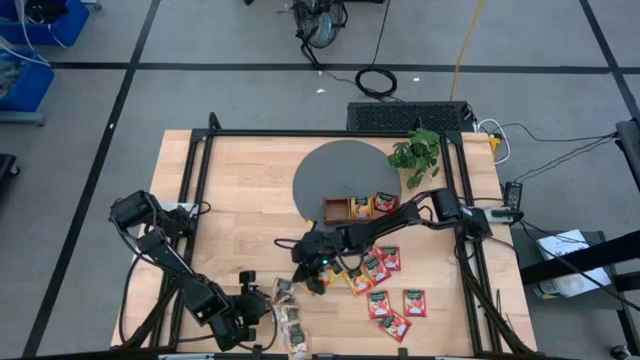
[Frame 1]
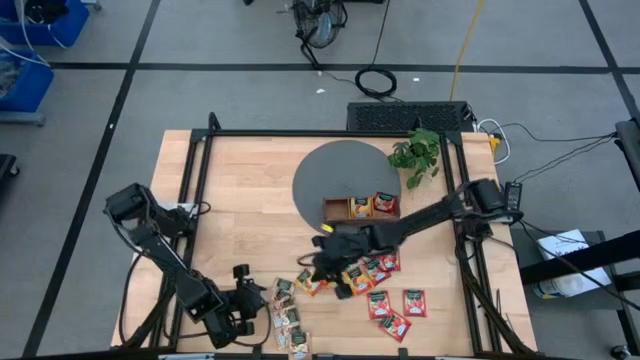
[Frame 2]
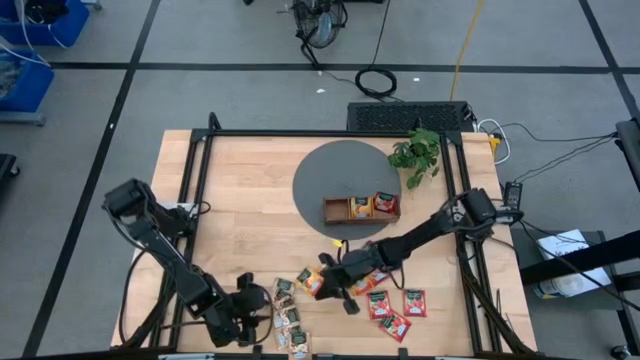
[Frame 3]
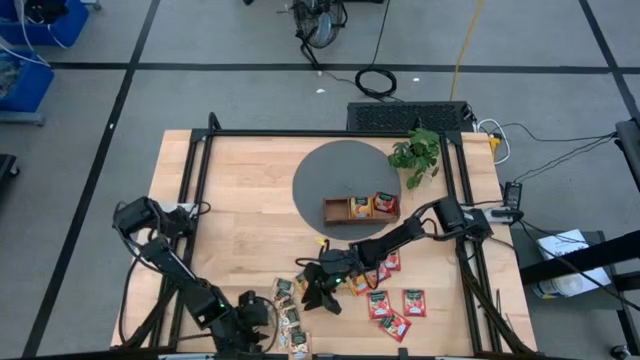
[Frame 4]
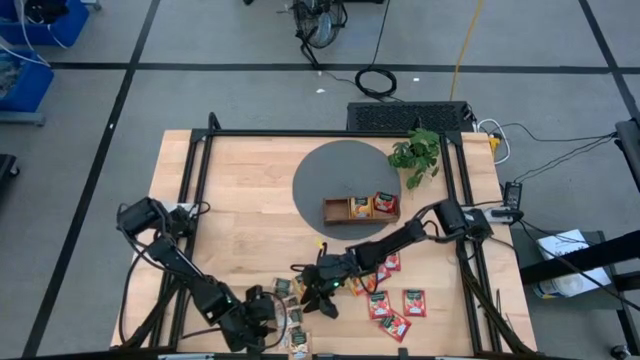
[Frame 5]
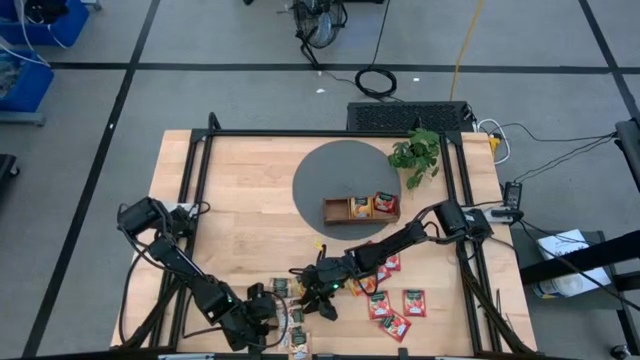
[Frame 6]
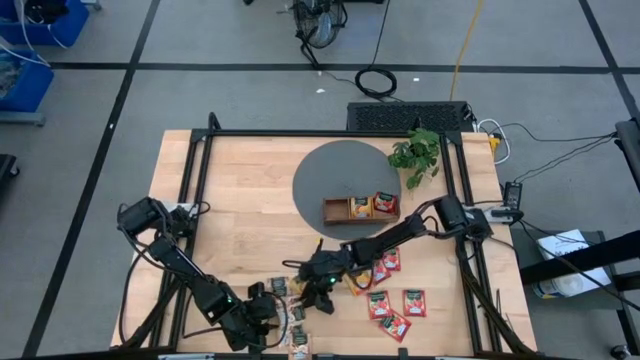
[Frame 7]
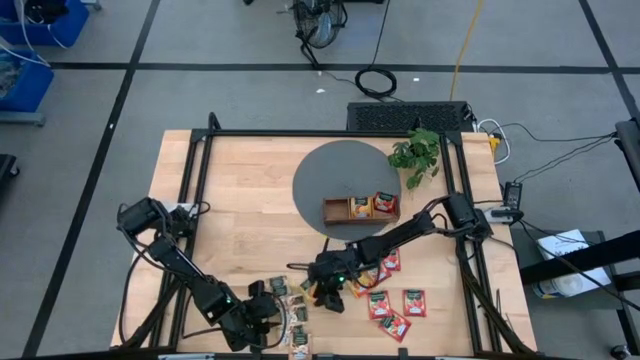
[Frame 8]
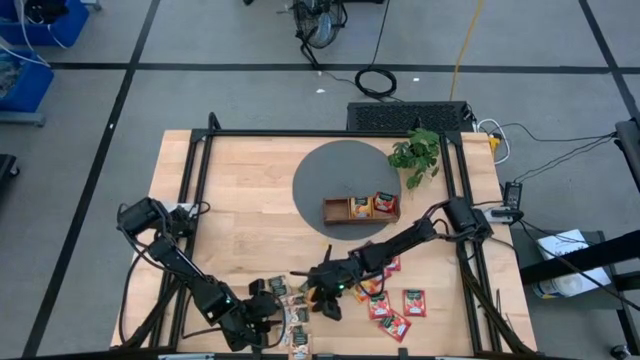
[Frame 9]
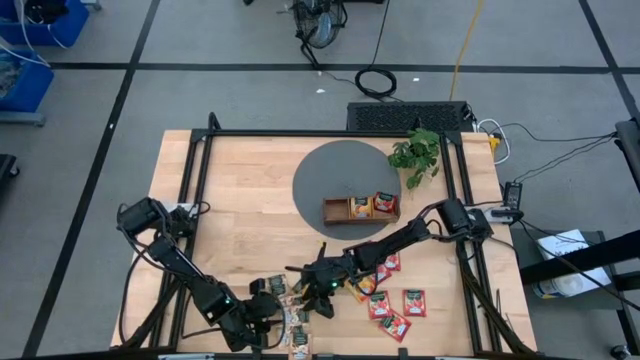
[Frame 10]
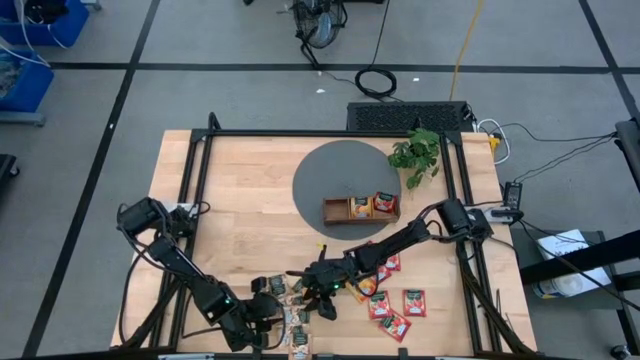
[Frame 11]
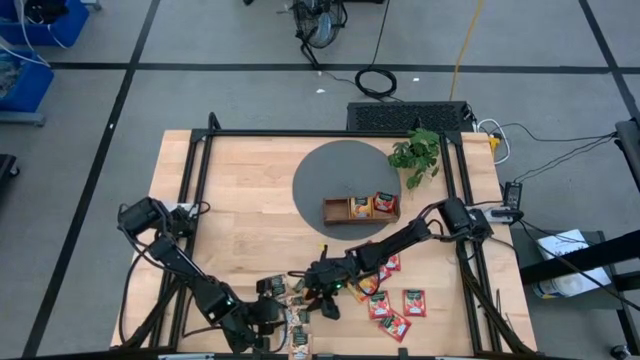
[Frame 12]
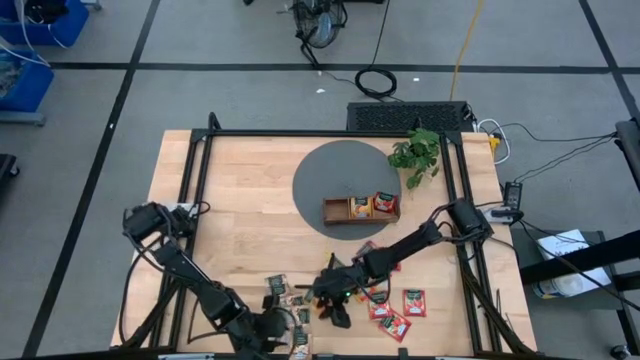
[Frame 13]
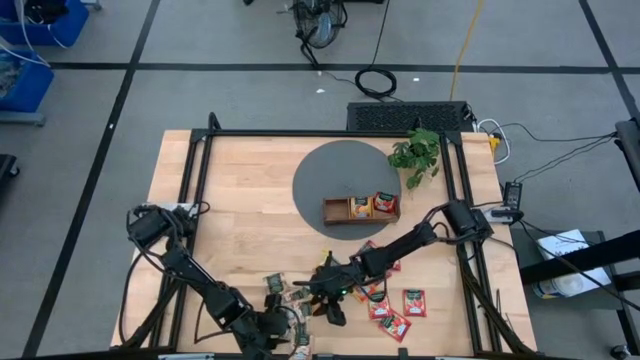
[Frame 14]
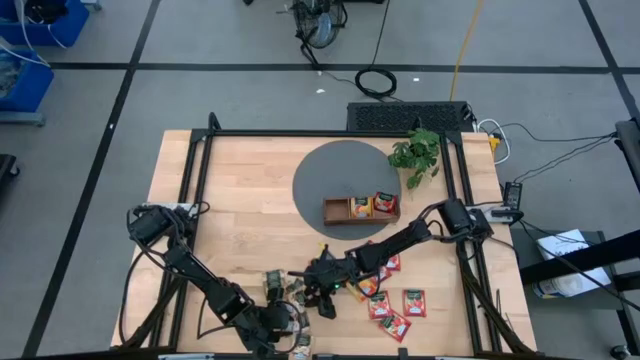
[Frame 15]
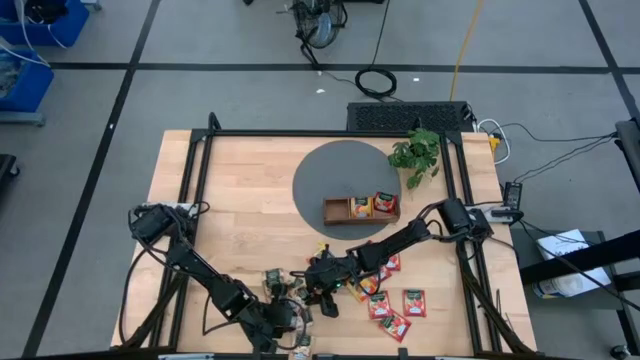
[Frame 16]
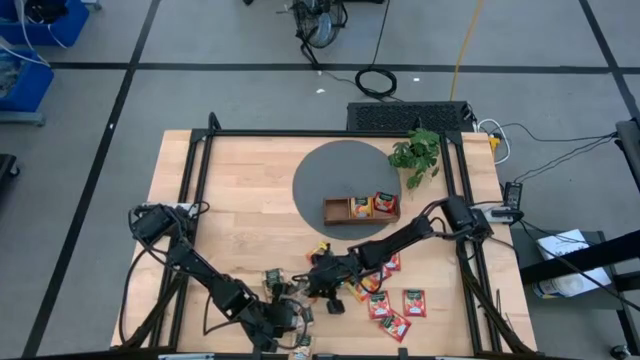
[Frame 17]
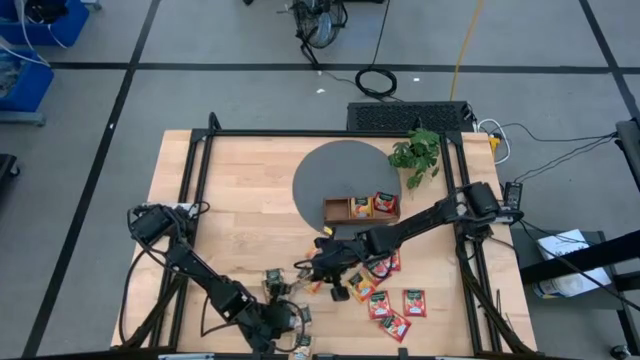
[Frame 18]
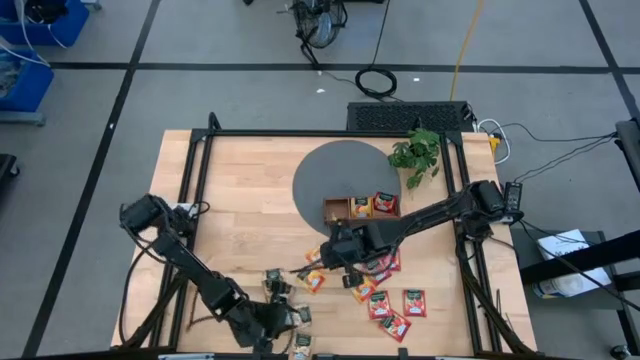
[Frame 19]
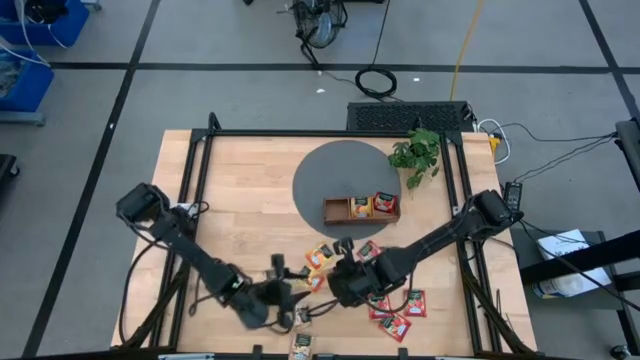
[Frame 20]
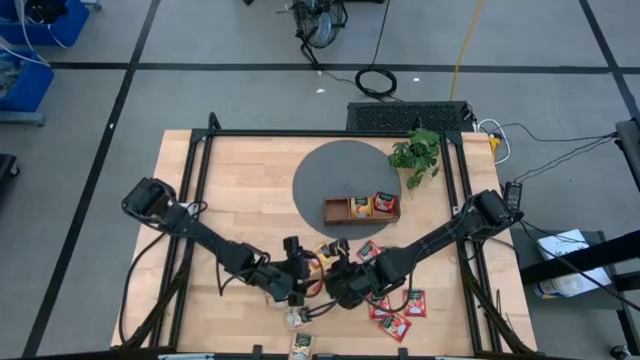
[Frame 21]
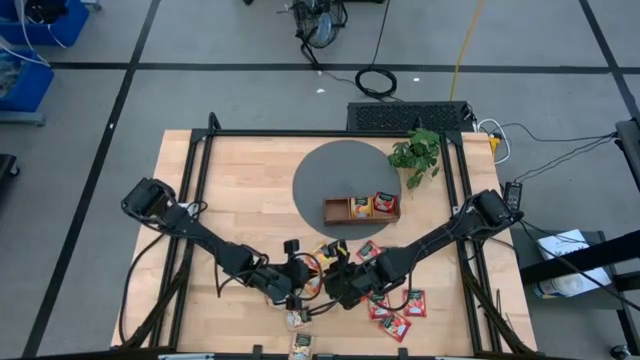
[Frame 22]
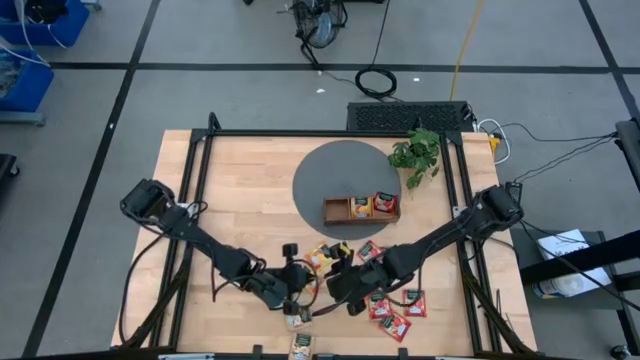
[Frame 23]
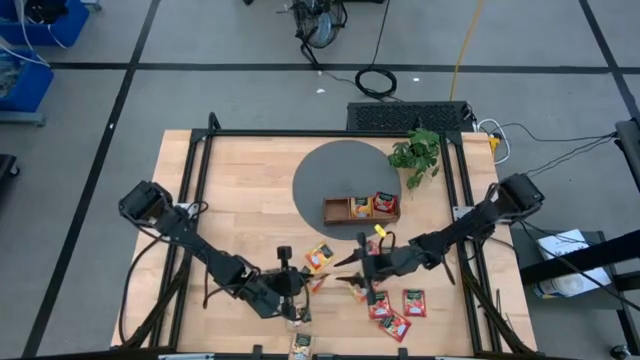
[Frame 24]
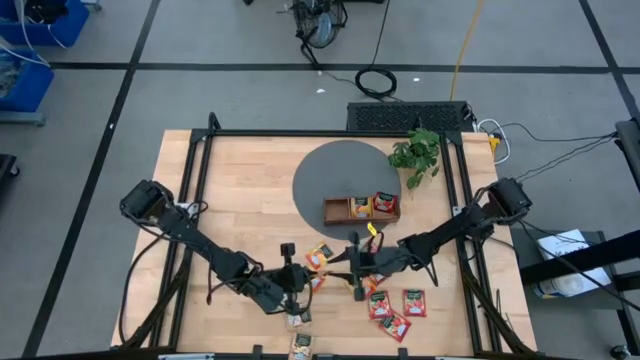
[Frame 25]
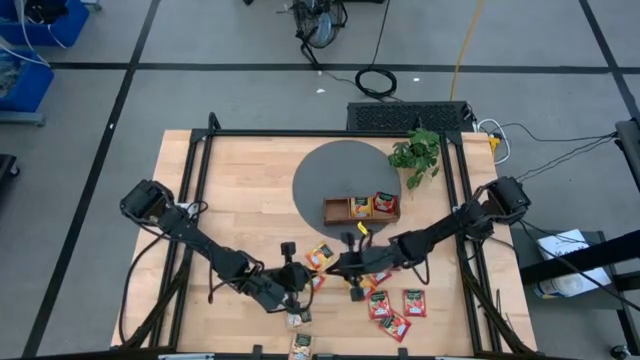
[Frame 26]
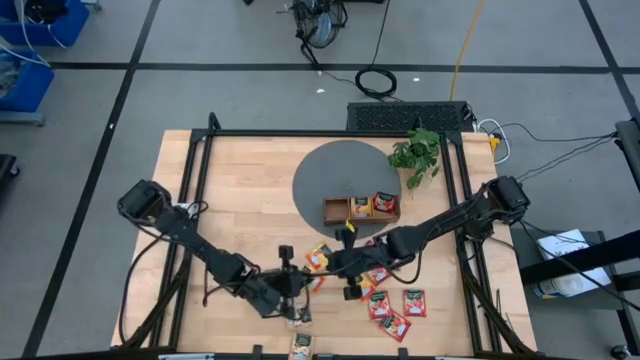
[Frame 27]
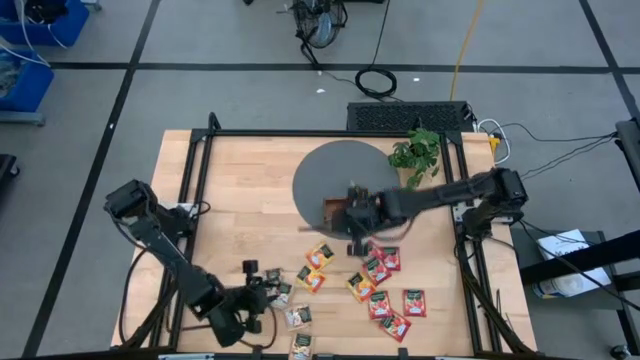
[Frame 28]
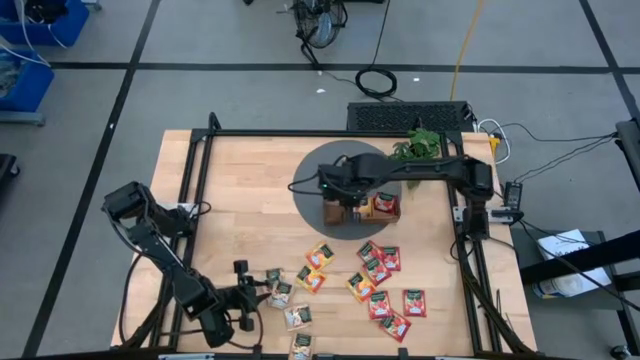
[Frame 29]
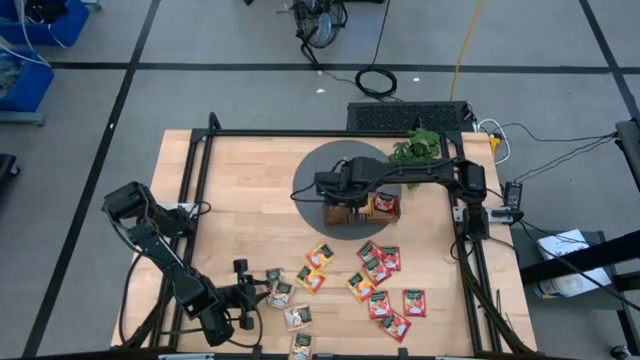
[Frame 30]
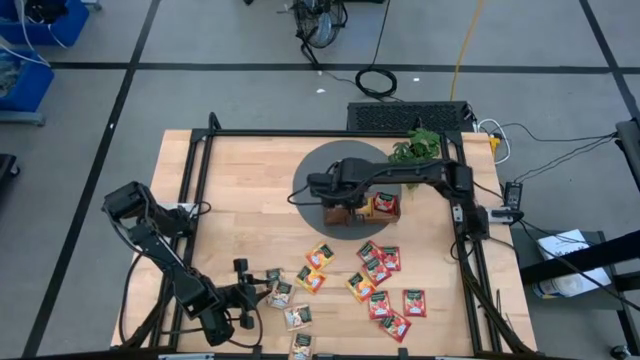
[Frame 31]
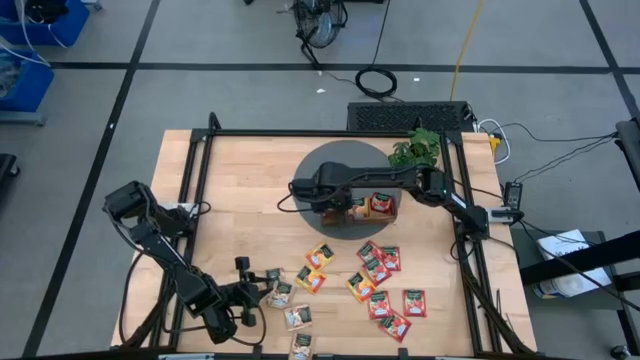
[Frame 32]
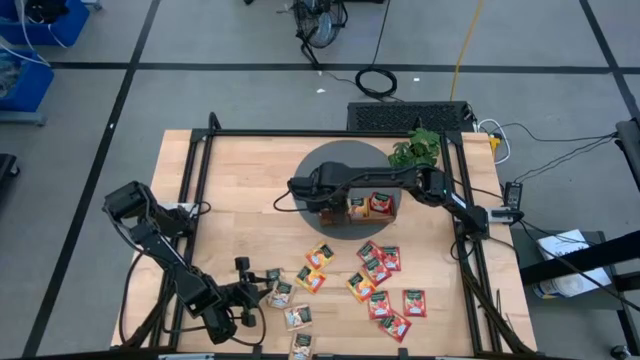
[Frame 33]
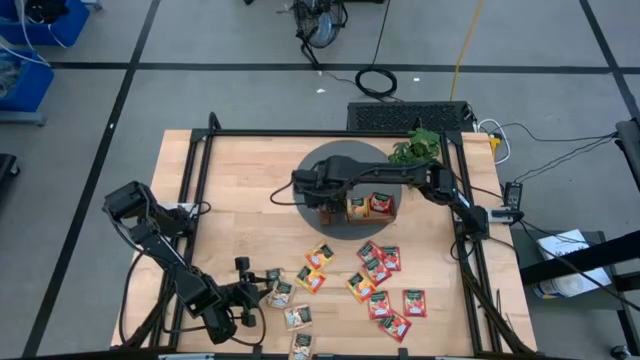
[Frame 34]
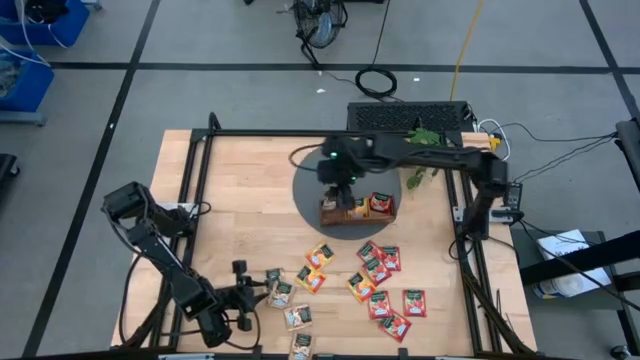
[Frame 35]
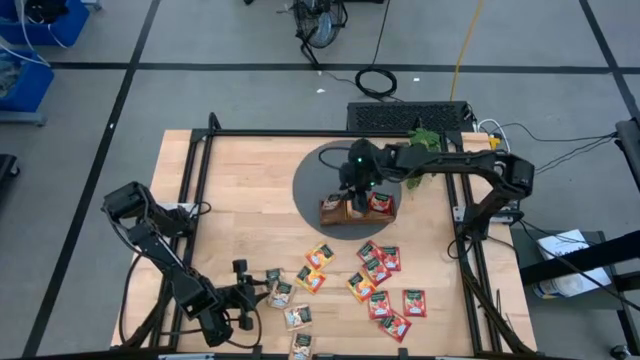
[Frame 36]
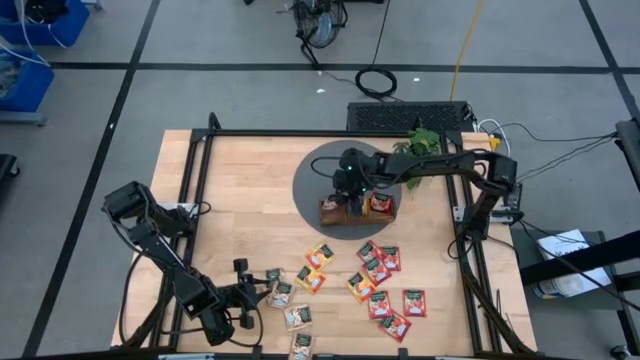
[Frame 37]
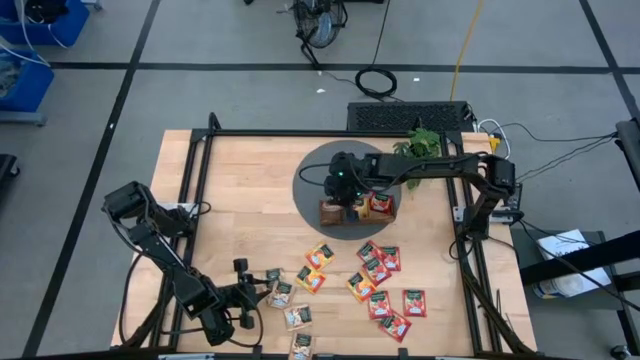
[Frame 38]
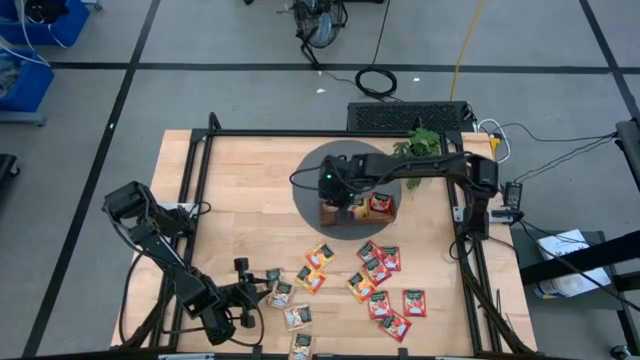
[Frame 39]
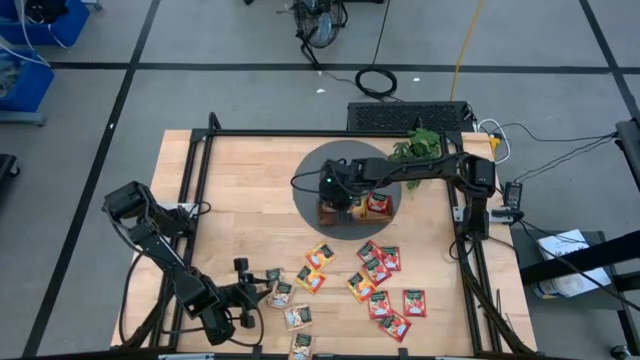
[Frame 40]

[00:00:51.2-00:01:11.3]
Task: Pick & Place Tea
Put the brown tea bag into the left section of the wooden organizer

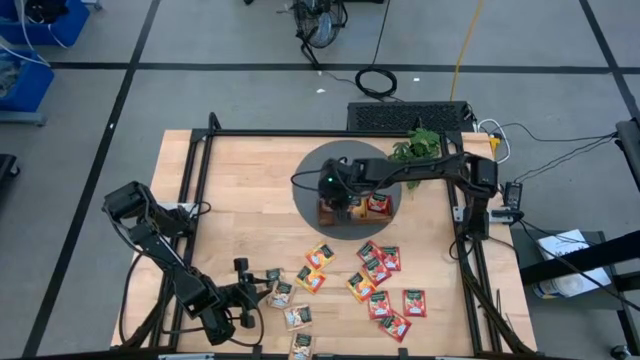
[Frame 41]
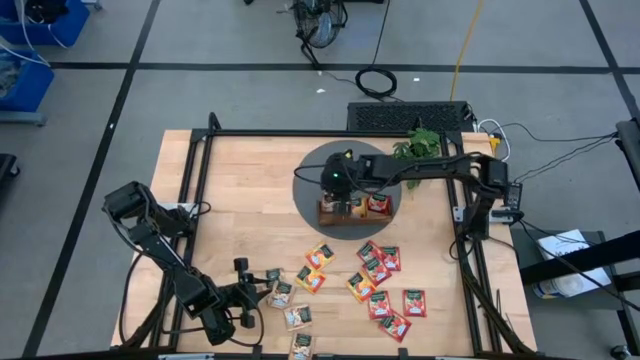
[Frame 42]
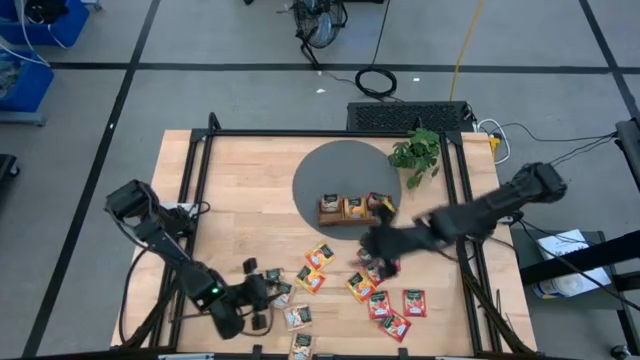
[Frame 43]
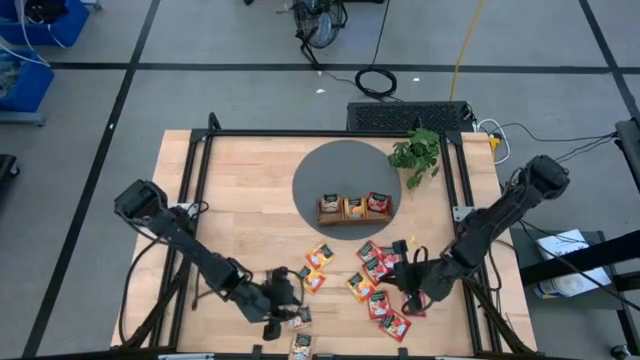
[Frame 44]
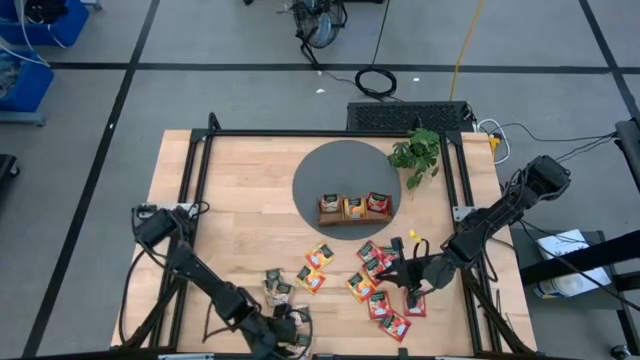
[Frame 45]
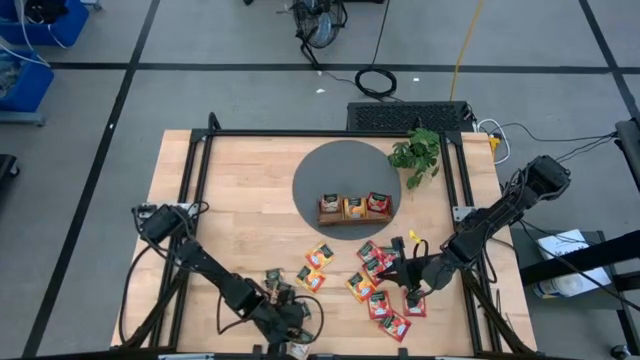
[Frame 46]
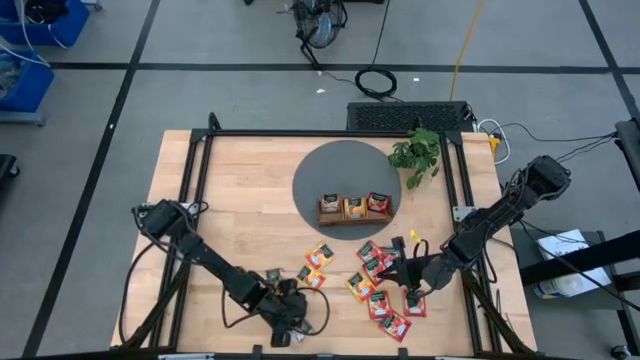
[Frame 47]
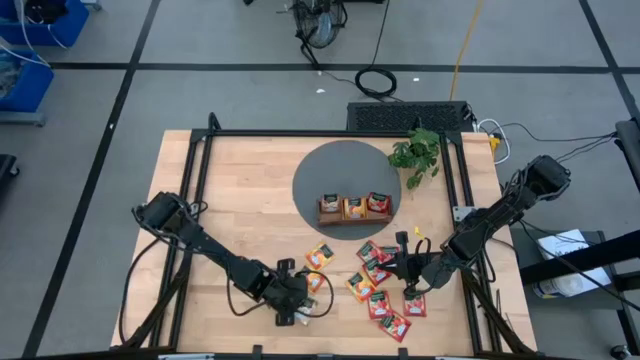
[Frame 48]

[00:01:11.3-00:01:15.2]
Adjust the brown tea bag on the table
